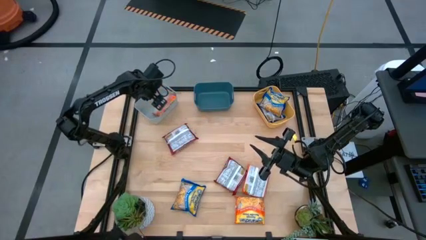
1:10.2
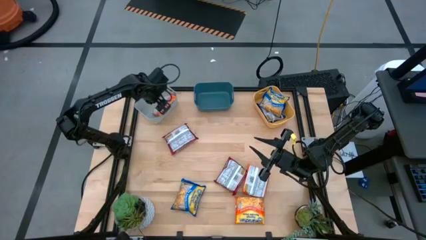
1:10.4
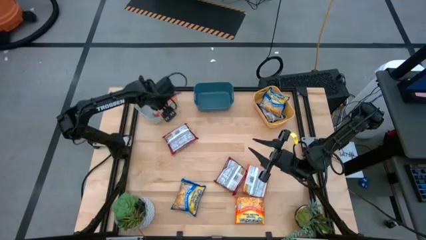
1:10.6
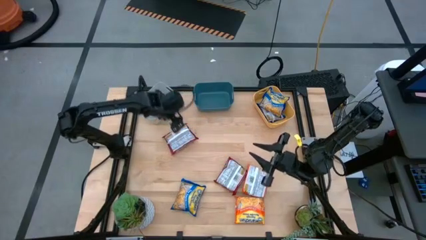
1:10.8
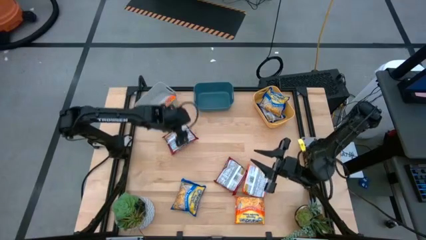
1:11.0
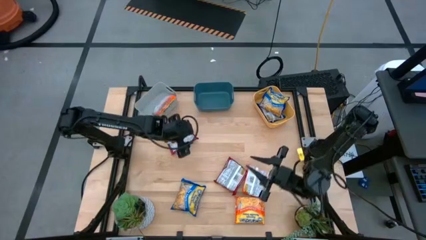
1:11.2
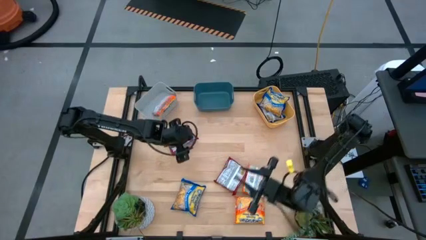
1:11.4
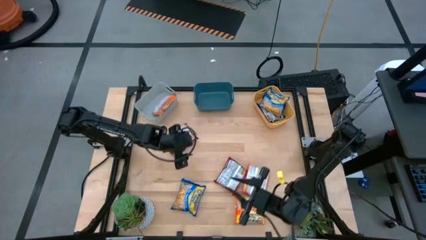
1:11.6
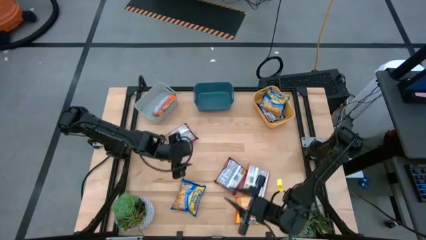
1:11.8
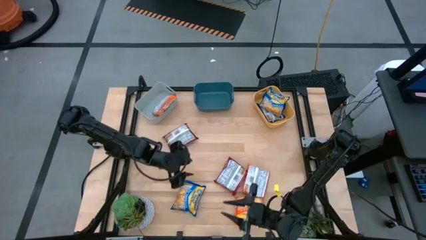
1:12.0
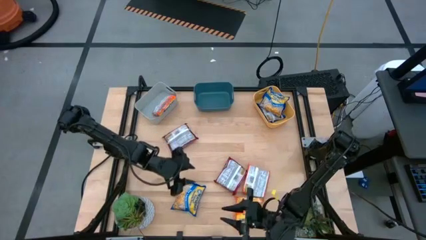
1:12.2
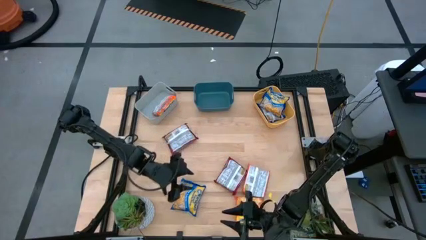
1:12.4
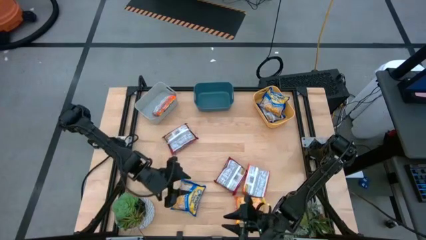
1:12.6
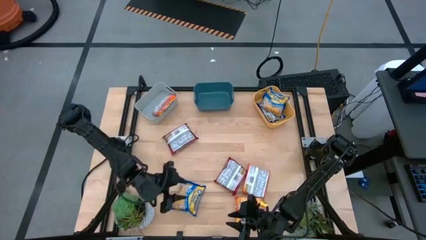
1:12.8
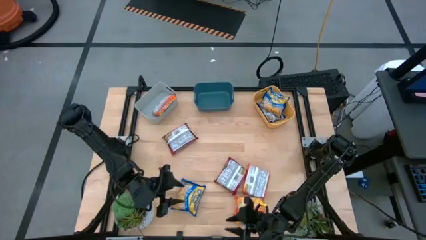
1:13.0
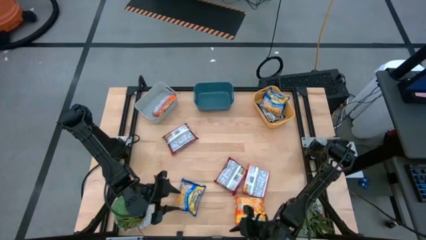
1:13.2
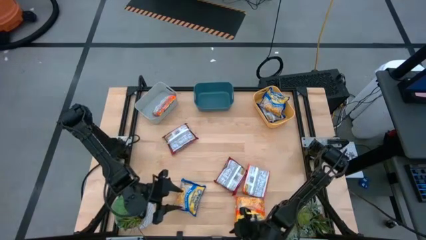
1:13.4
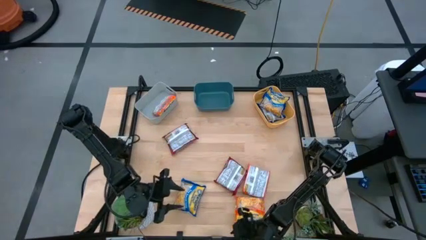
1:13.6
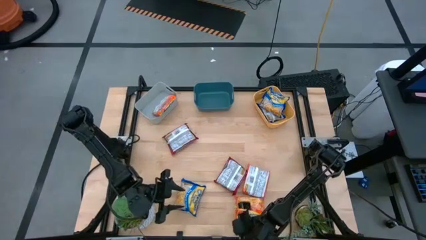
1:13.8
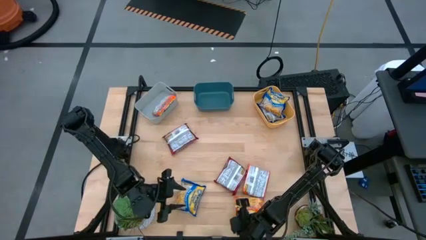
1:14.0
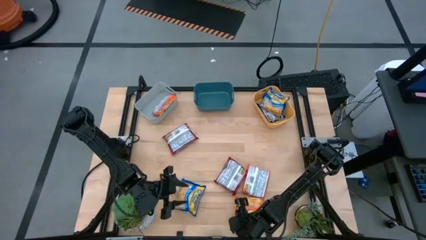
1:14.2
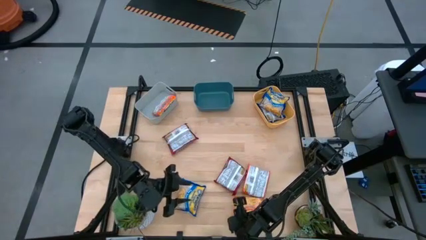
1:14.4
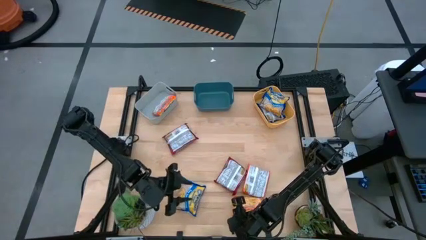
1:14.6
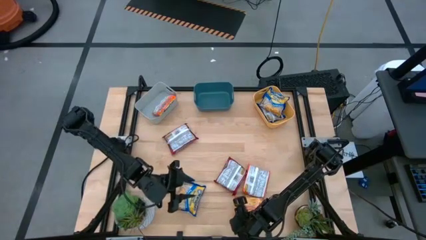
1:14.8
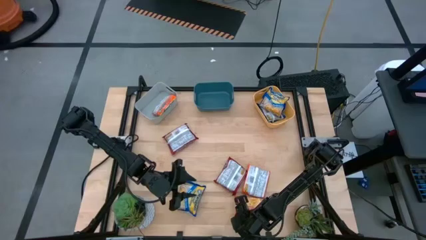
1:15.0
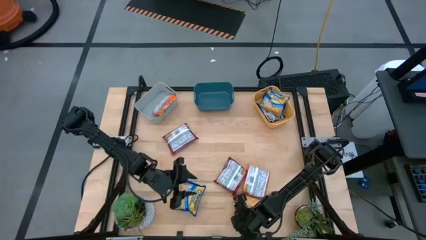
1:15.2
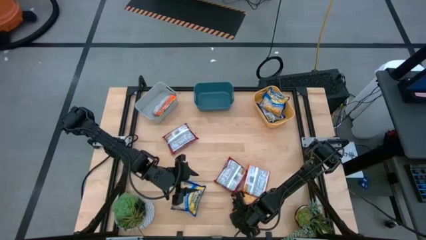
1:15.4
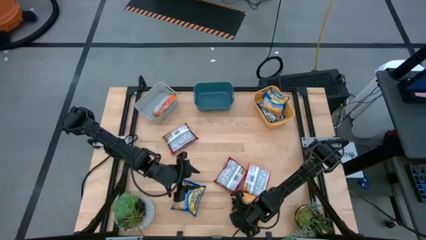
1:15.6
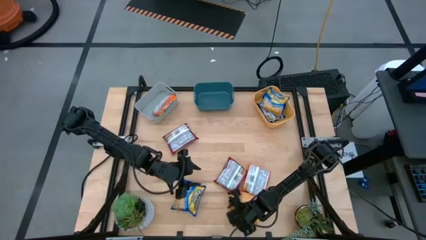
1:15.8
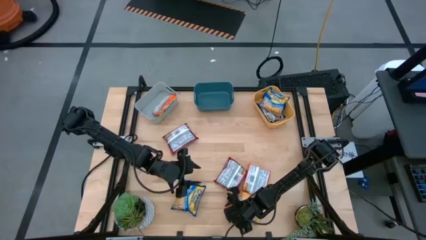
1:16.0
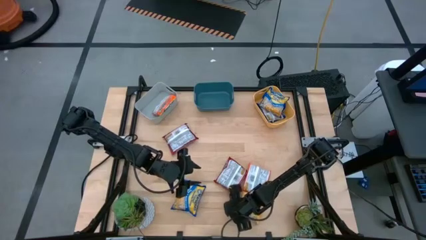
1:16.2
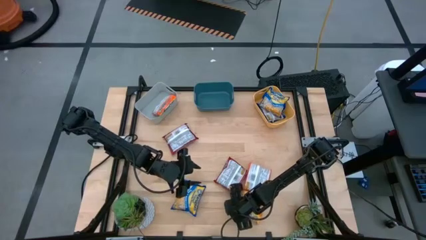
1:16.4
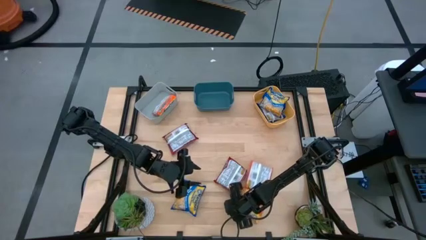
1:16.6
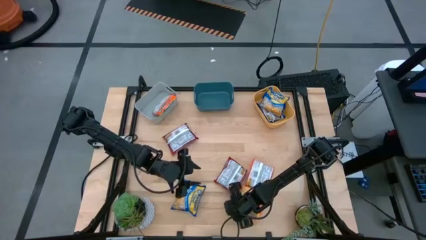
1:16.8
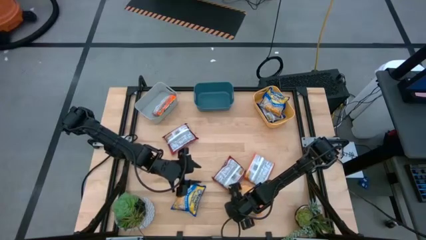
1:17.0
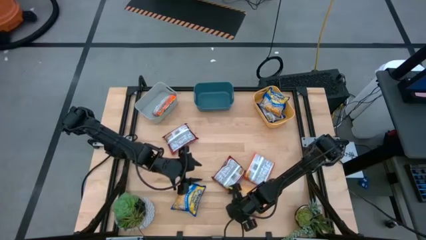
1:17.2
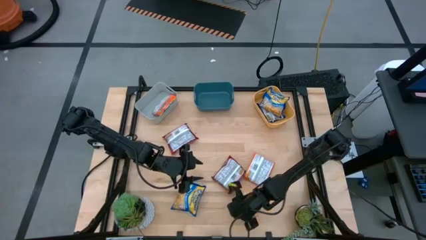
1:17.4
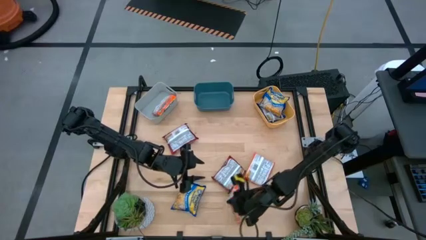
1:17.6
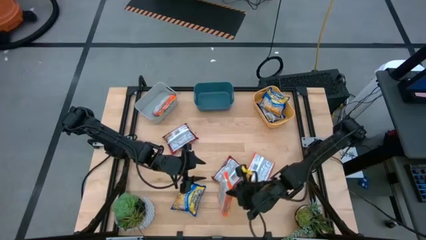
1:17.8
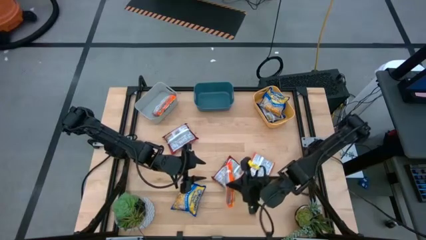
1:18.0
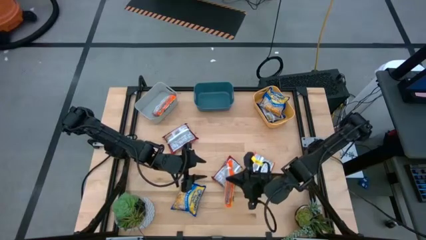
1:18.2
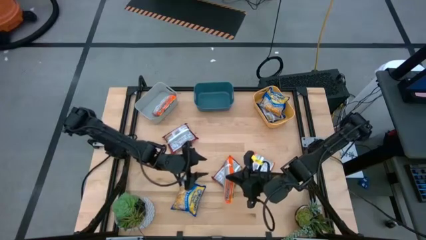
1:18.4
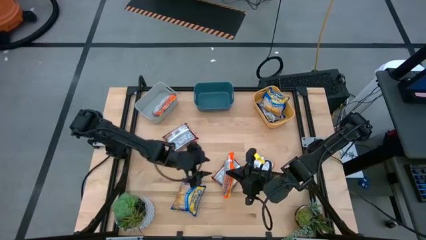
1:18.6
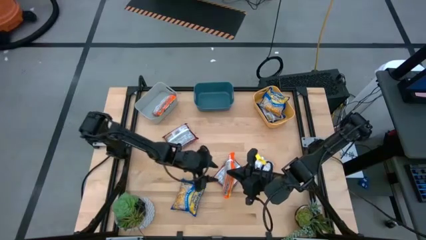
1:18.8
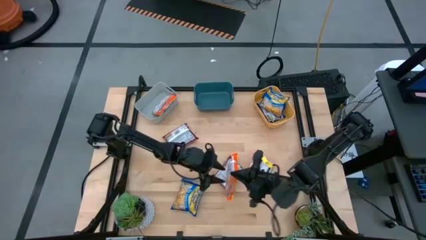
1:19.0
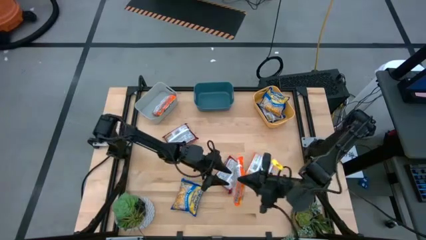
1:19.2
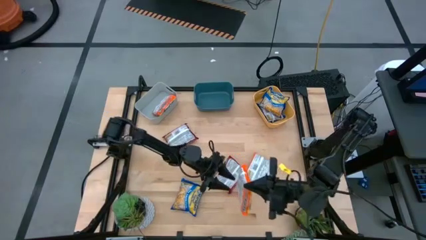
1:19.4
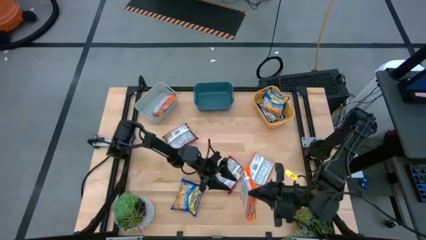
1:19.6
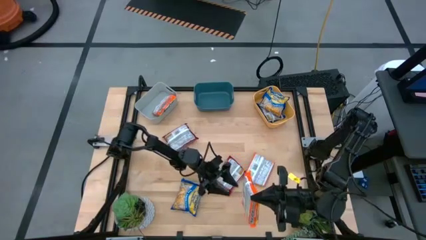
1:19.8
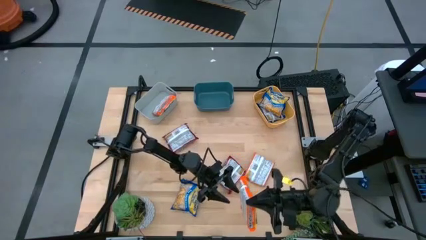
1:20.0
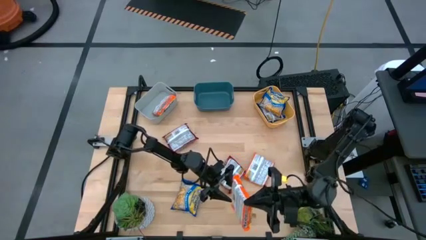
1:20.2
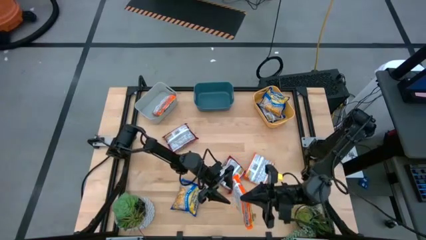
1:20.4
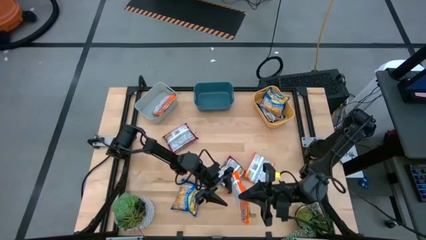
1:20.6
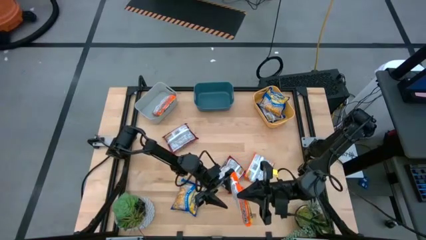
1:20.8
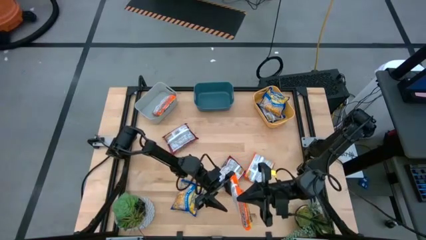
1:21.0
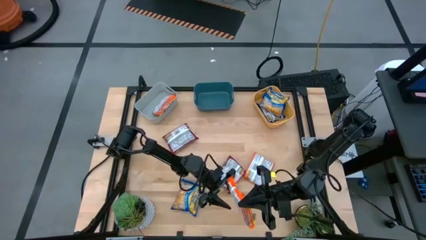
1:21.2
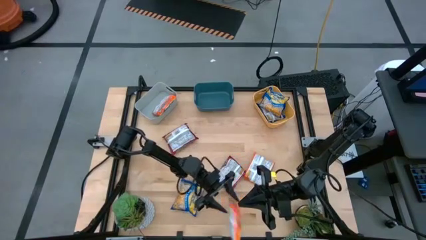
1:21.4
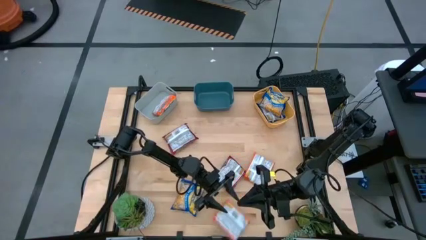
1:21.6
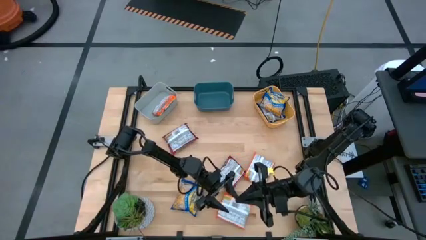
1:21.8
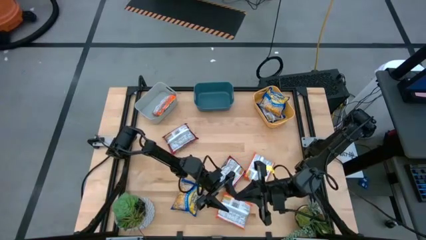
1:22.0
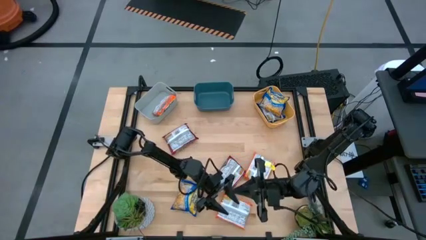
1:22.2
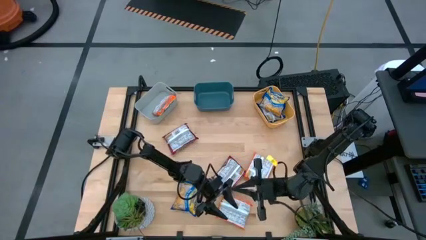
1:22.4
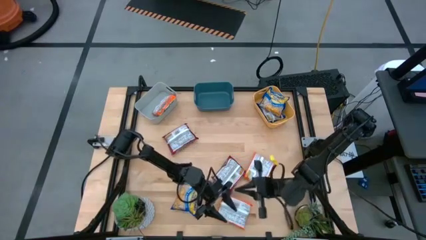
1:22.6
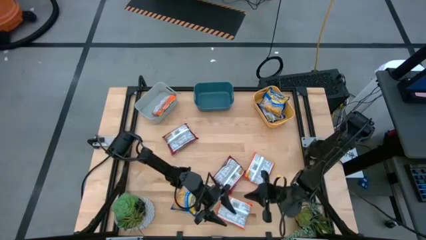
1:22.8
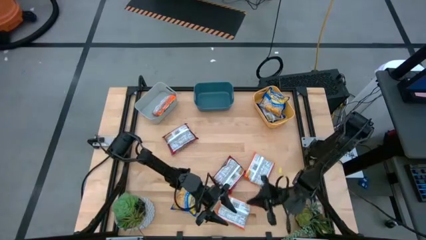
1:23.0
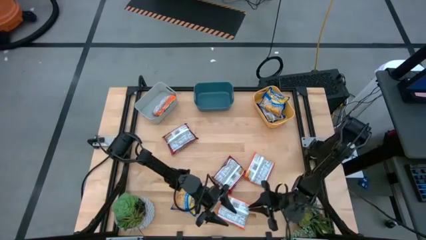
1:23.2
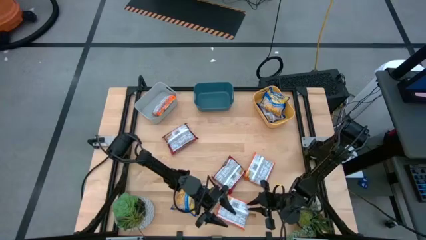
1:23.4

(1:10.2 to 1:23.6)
Task: Sort Maruchan noodles
Put the bottom orange noodle pack into the gray bin
